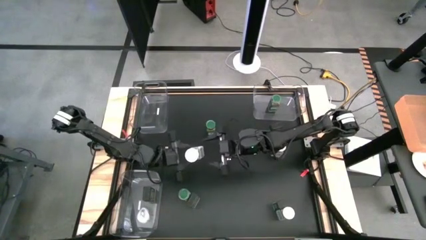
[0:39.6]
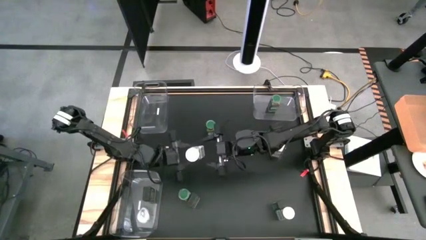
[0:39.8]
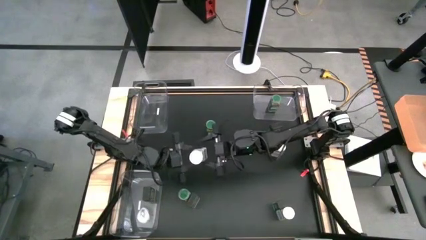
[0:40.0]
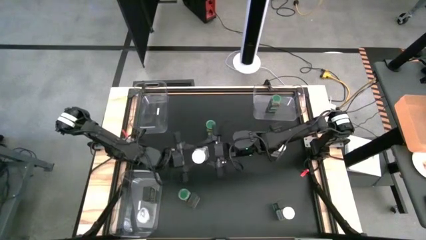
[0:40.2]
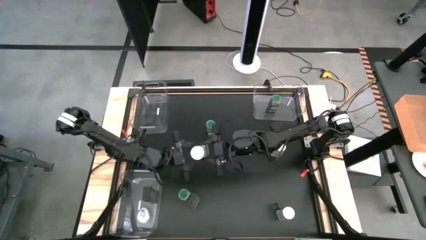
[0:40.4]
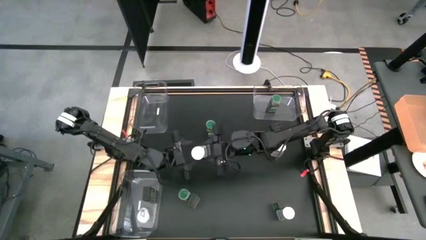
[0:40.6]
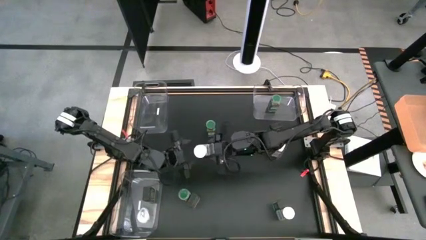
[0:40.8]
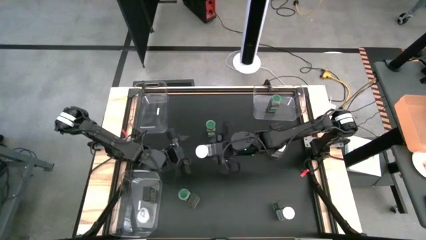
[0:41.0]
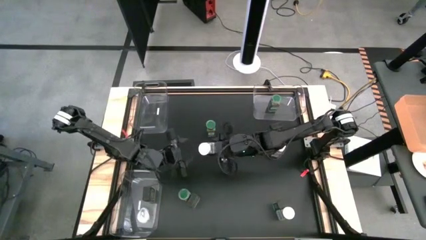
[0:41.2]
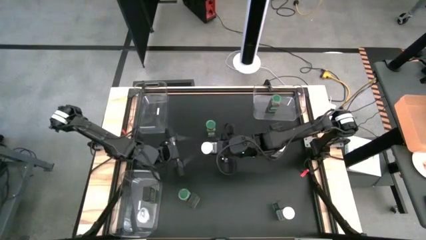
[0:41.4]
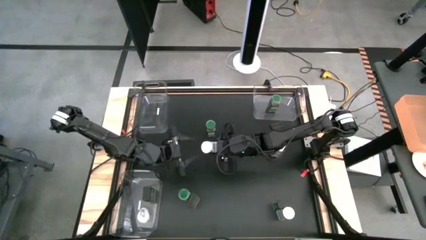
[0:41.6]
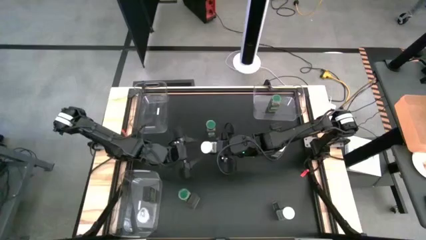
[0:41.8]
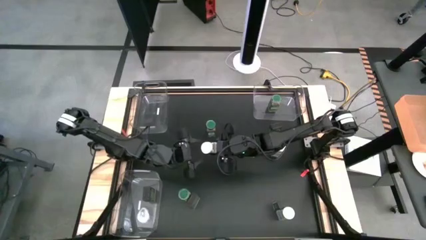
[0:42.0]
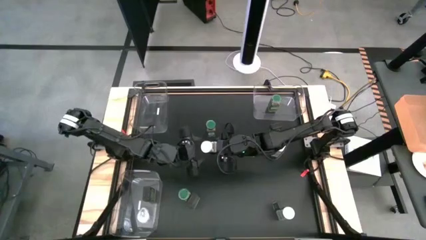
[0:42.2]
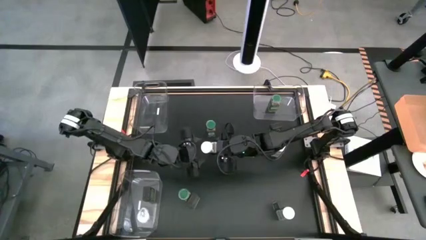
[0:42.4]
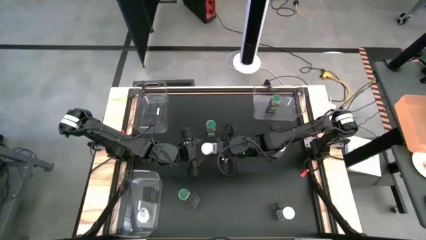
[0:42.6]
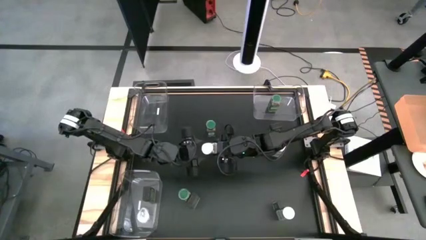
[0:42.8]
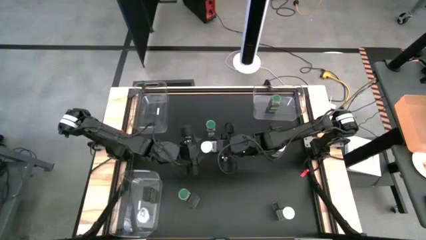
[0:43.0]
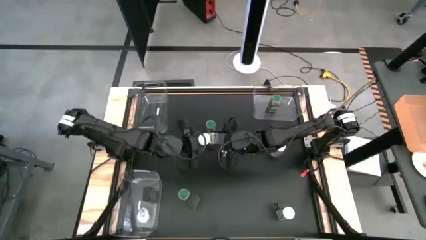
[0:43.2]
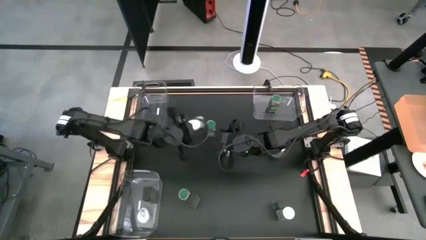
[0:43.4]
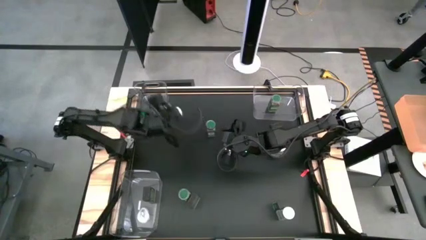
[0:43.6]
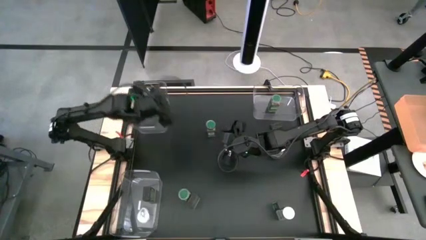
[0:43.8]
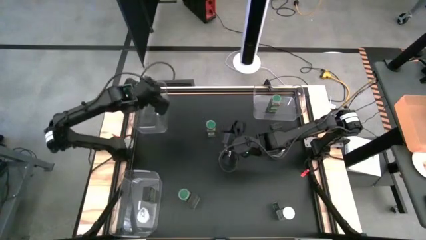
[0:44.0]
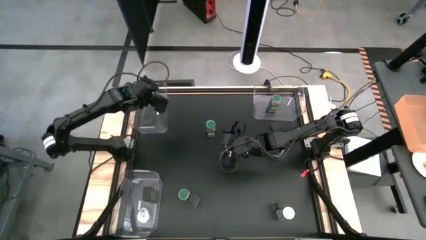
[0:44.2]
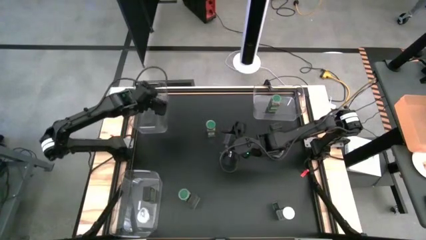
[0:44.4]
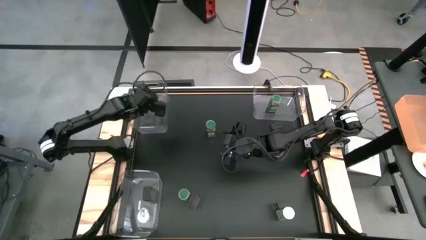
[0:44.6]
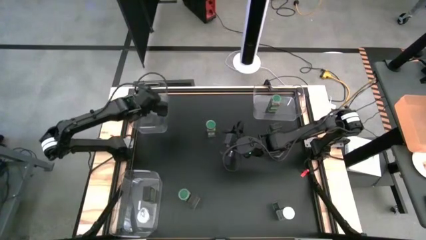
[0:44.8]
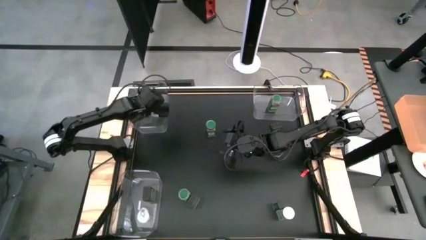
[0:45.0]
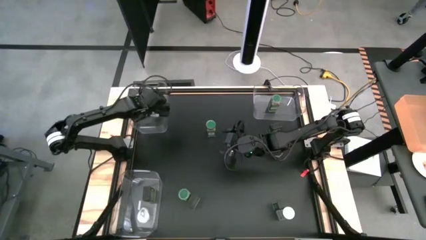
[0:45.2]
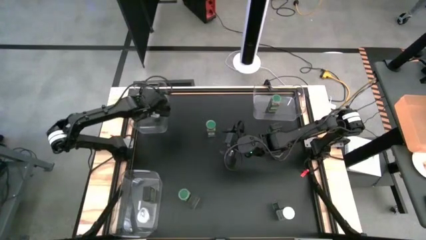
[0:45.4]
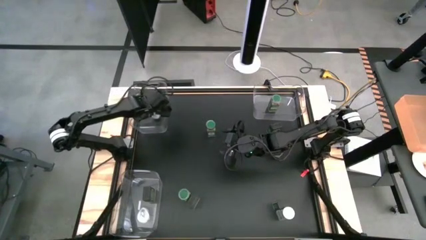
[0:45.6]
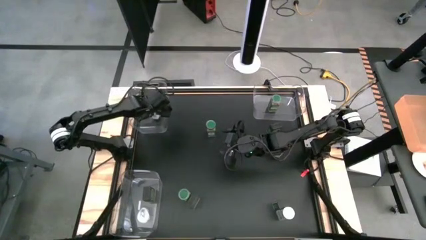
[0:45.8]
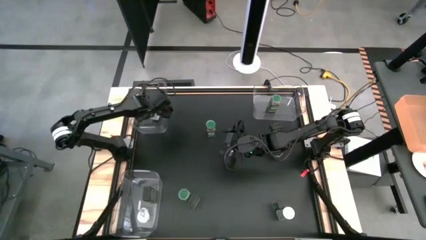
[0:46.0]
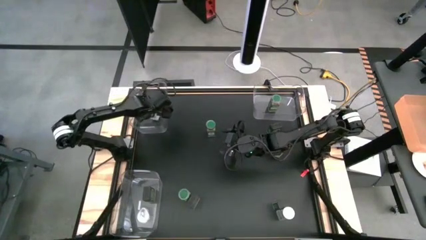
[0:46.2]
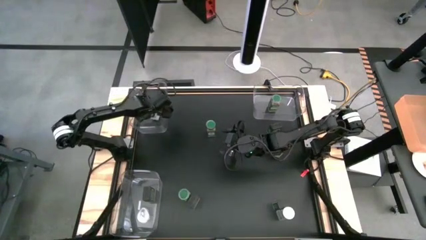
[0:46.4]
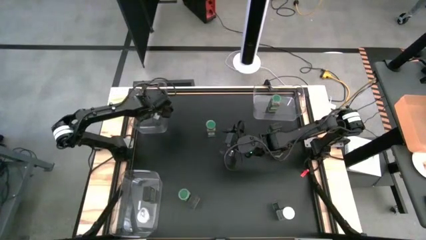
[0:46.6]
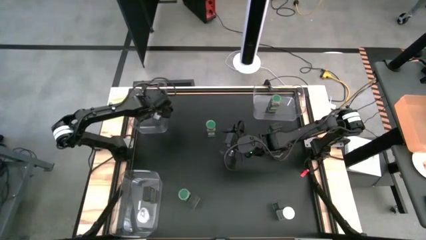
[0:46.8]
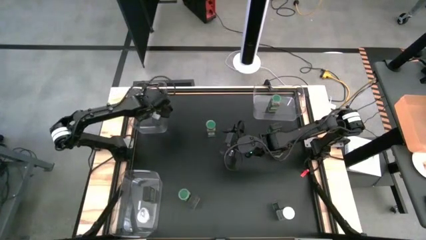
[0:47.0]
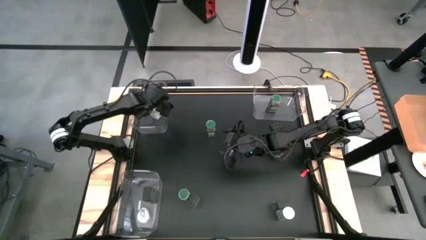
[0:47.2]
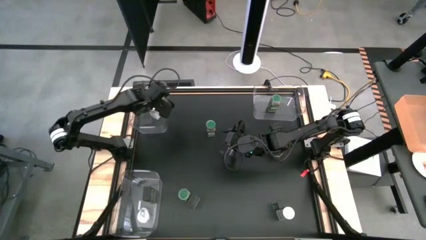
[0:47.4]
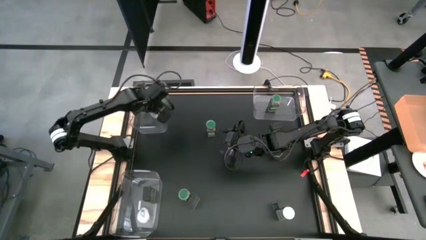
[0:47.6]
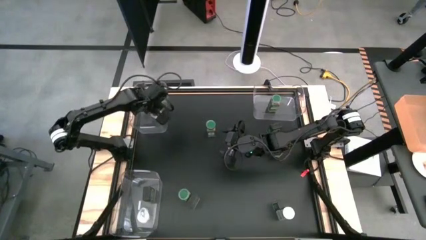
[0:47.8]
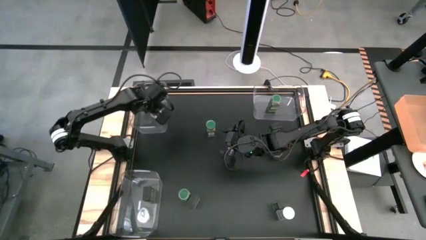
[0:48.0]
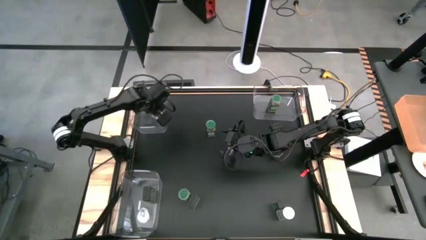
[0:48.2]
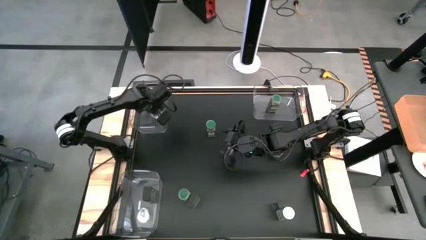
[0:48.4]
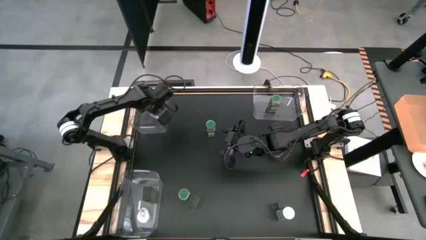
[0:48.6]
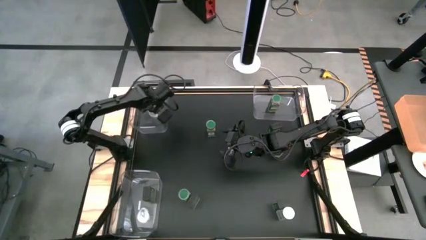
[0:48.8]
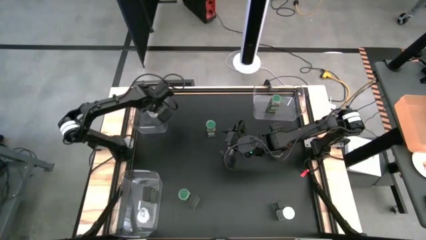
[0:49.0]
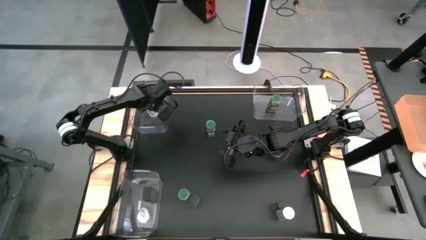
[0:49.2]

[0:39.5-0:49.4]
Task: Sort spices by type
Put the top white seasoning bottle into the top left transparent bin

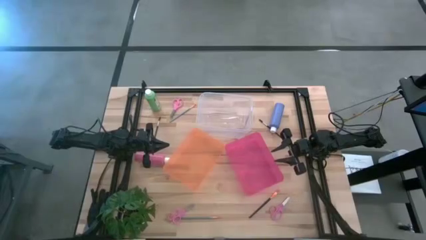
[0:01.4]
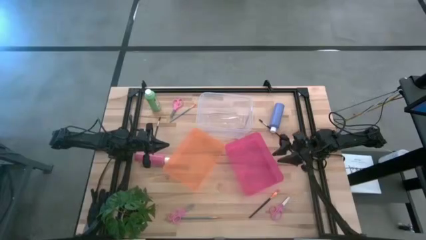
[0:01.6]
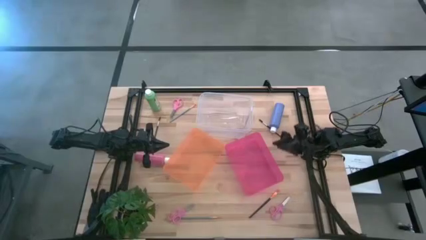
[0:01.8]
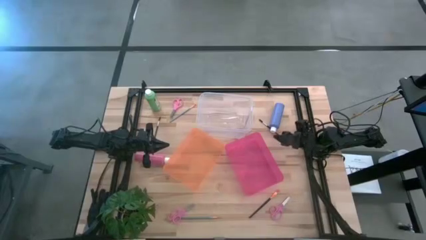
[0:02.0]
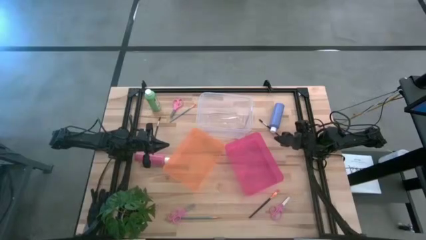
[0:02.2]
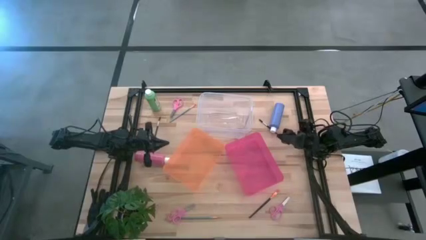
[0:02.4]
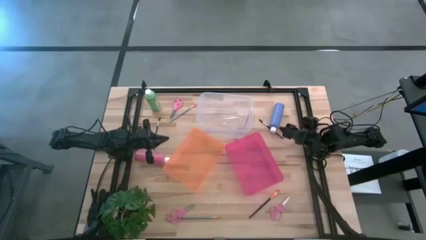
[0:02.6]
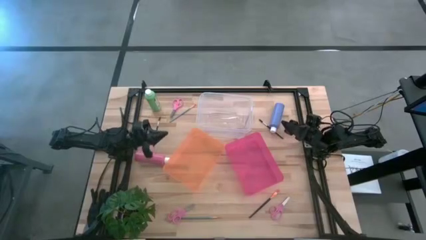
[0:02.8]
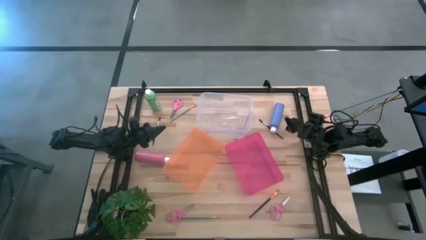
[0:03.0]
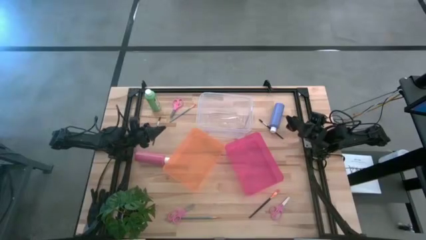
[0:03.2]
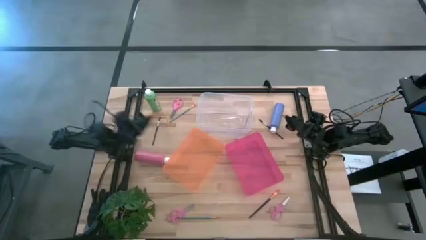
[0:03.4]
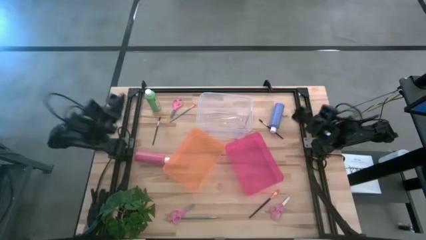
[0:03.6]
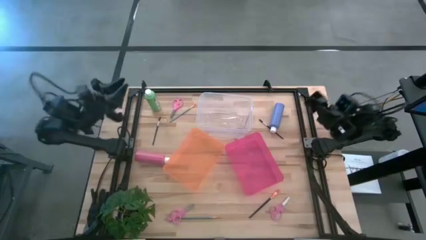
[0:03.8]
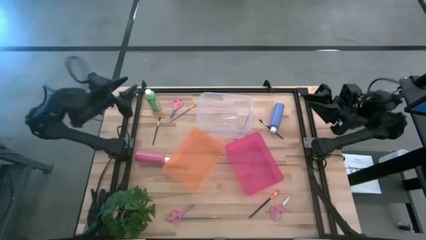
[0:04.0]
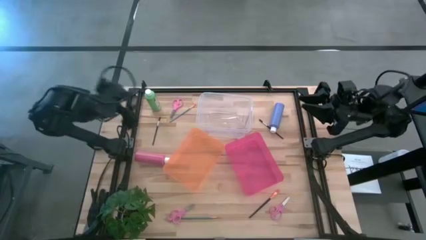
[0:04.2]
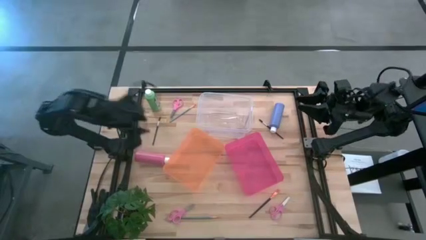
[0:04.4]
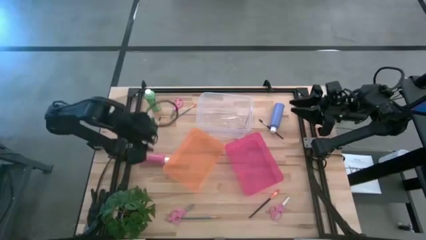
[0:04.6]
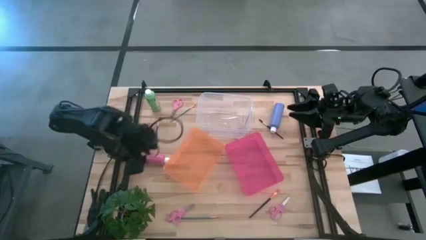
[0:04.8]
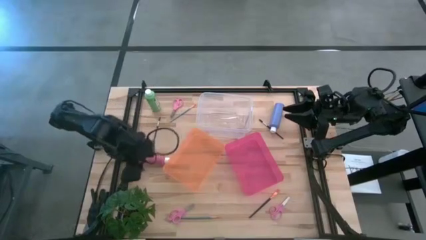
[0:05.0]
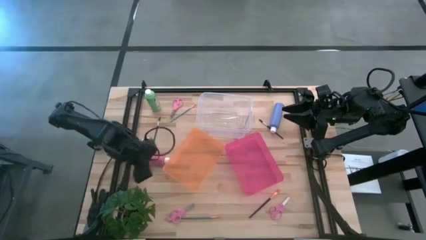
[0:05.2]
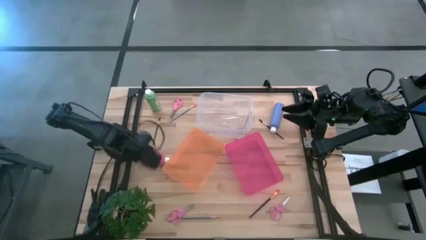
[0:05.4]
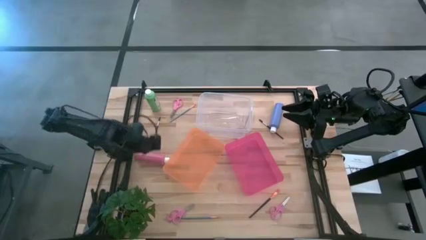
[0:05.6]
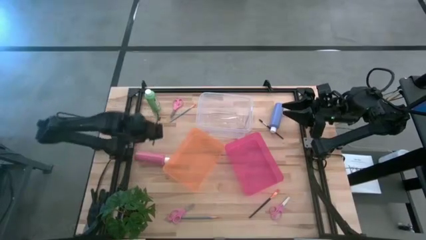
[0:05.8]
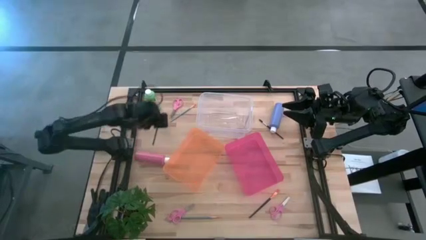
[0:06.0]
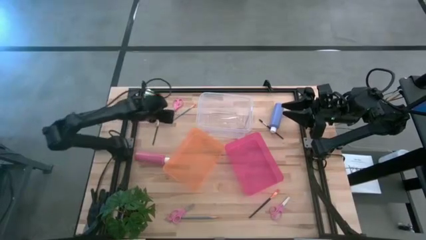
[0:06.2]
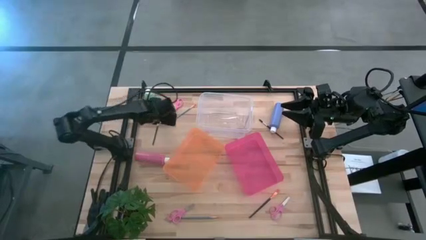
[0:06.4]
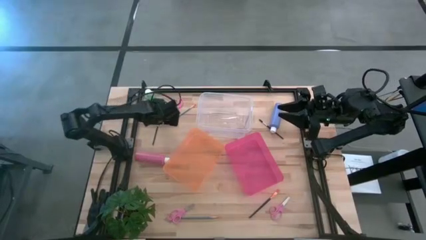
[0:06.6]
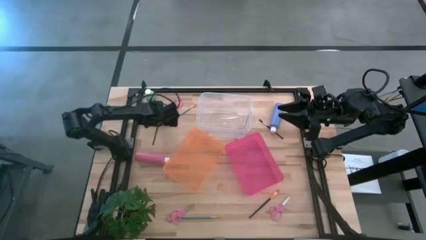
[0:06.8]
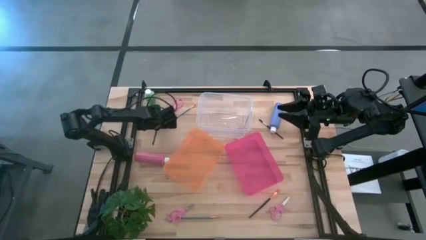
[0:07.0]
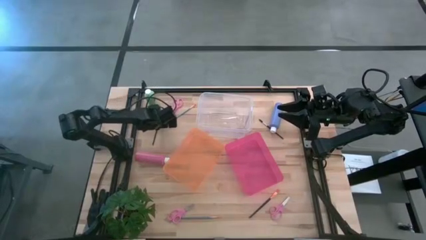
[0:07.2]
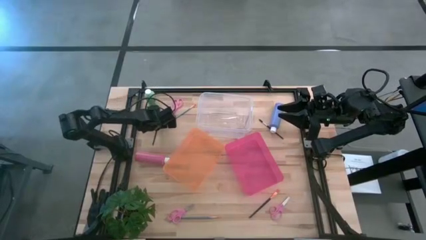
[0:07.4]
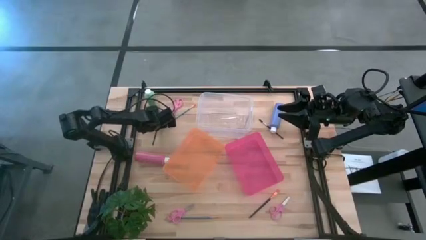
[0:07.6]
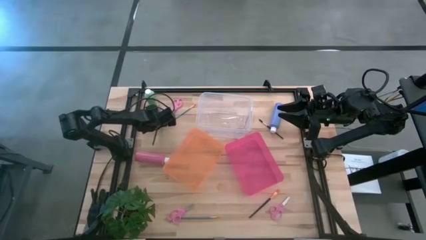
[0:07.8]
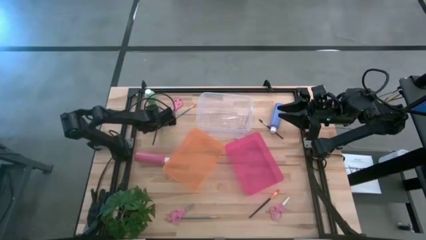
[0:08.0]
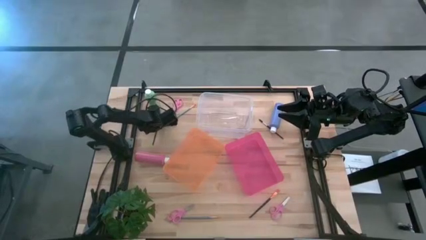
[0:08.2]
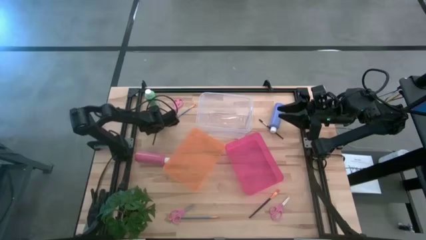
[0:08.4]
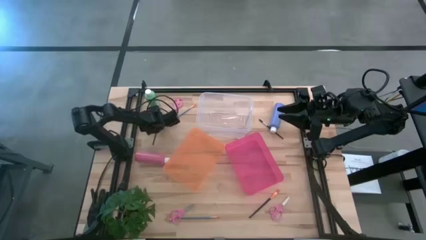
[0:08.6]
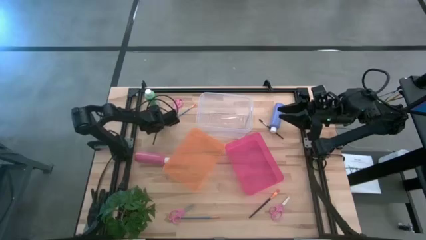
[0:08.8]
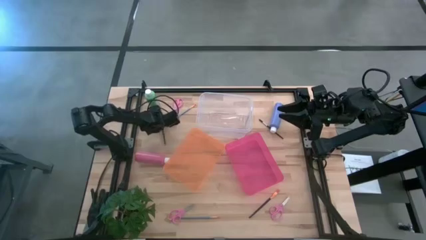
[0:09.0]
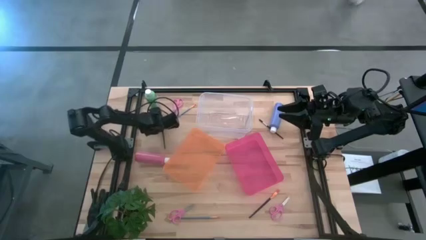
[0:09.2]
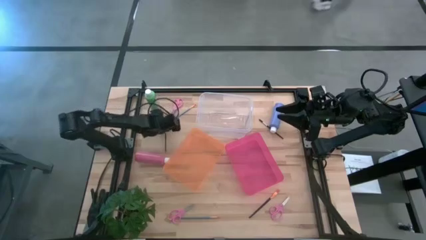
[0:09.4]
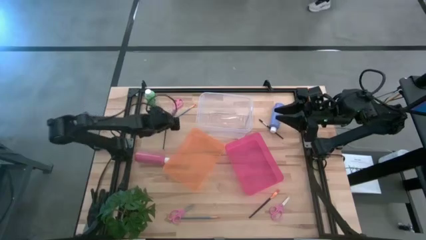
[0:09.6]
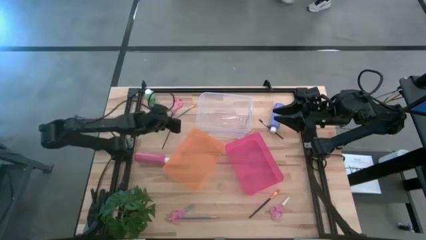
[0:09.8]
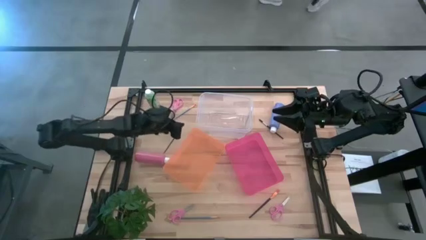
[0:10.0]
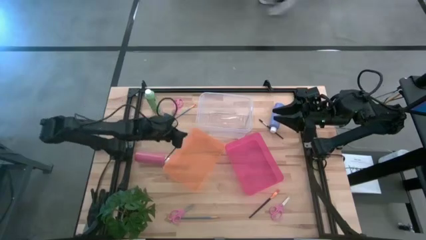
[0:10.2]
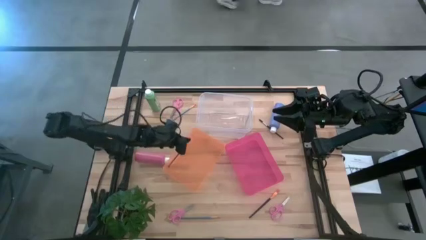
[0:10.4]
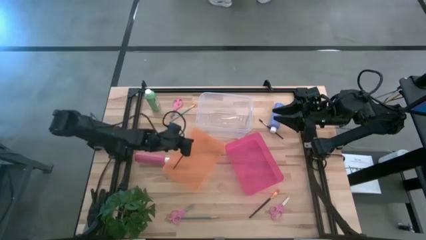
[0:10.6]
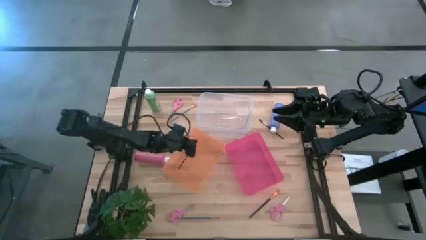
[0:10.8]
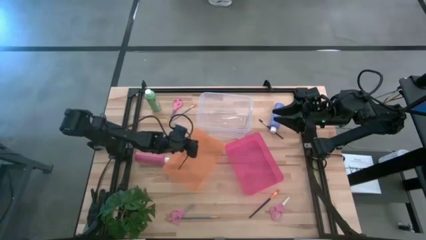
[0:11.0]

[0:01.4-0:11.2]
Task: Pick & Place Paint Supplies
Put the left black brow brush into the orange bin
